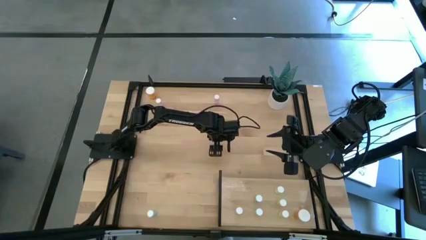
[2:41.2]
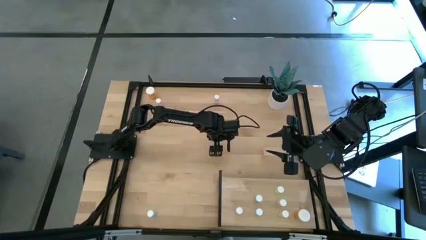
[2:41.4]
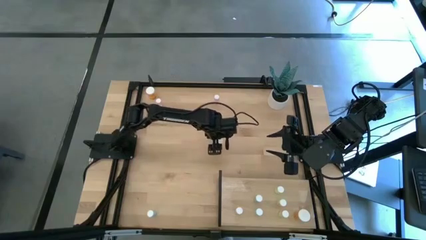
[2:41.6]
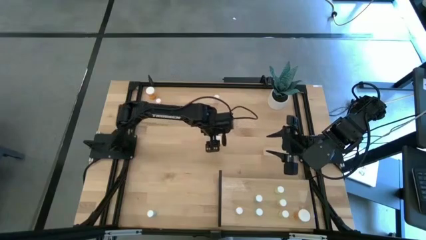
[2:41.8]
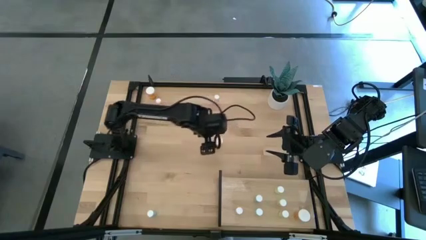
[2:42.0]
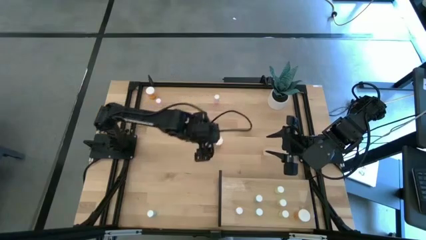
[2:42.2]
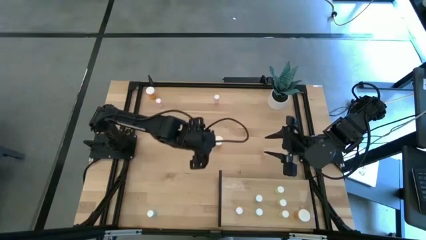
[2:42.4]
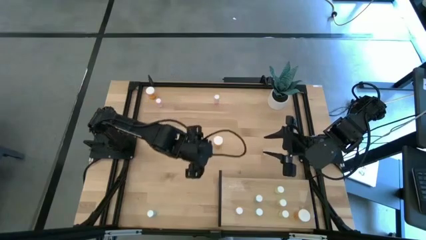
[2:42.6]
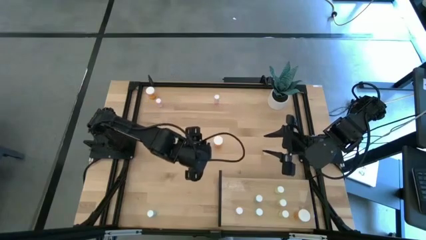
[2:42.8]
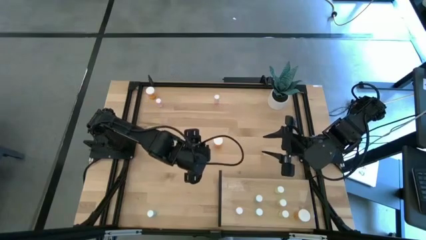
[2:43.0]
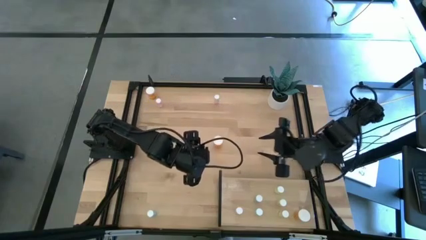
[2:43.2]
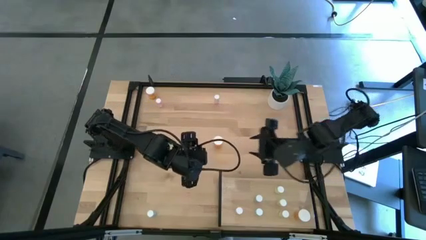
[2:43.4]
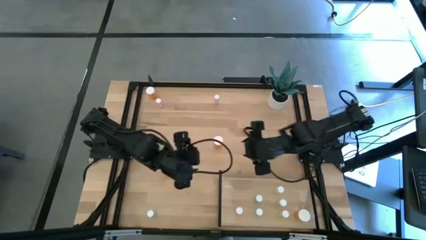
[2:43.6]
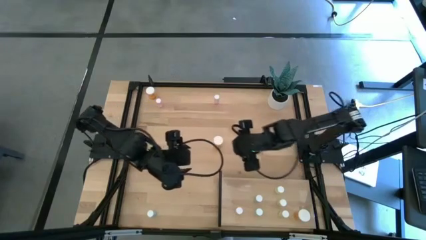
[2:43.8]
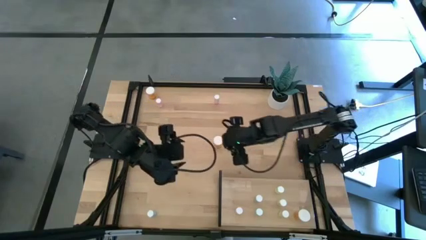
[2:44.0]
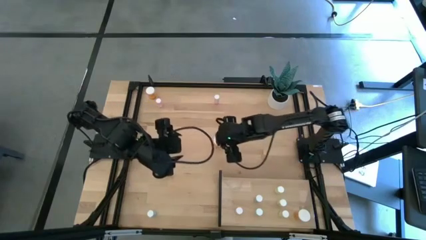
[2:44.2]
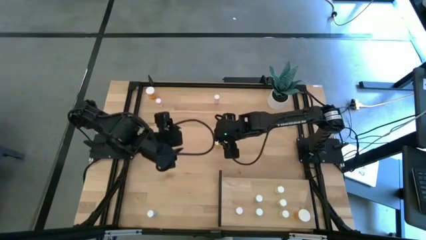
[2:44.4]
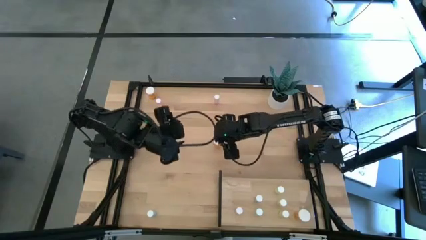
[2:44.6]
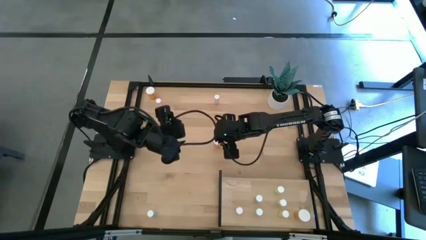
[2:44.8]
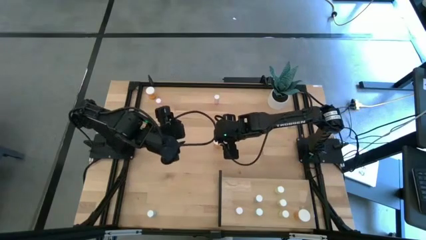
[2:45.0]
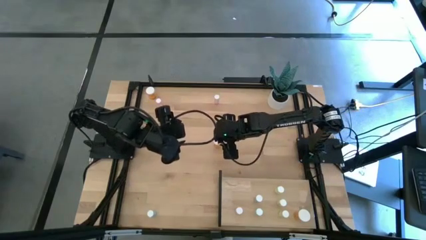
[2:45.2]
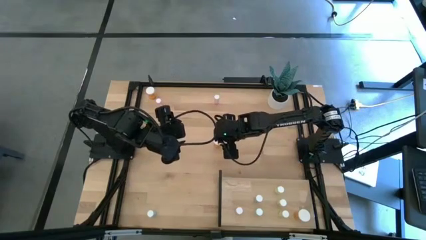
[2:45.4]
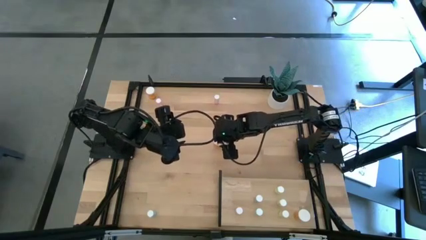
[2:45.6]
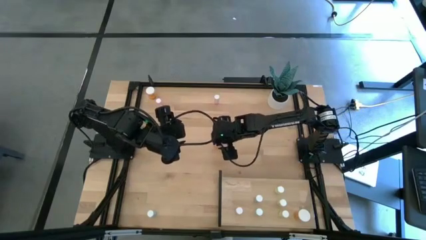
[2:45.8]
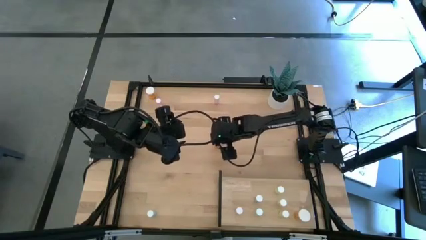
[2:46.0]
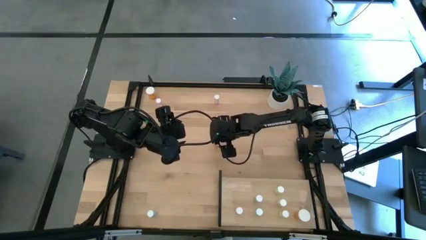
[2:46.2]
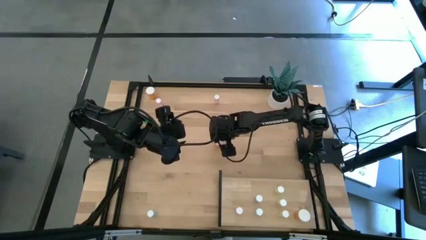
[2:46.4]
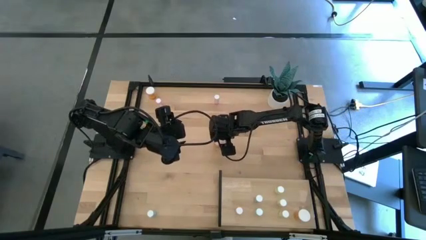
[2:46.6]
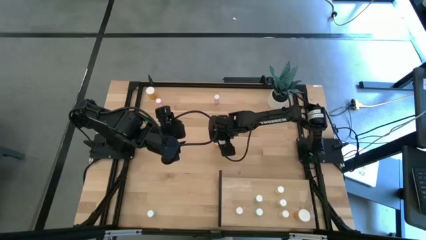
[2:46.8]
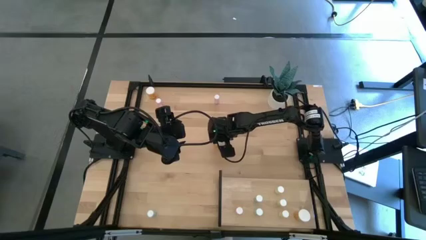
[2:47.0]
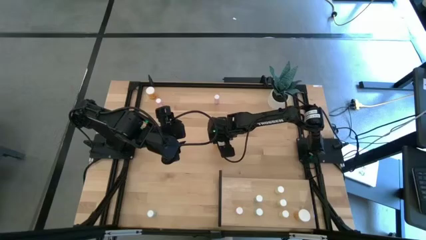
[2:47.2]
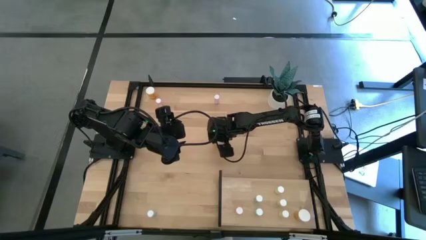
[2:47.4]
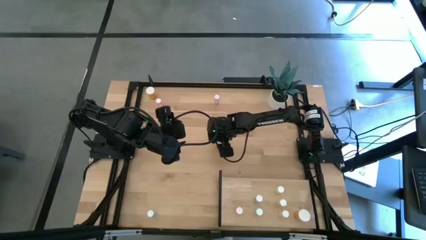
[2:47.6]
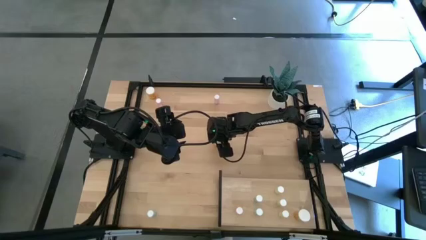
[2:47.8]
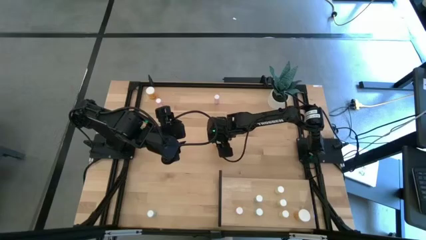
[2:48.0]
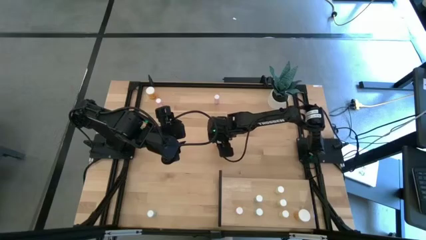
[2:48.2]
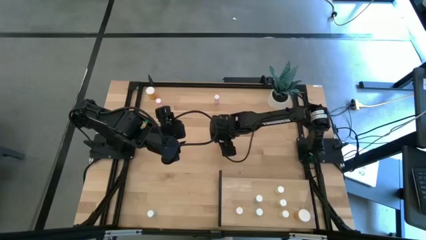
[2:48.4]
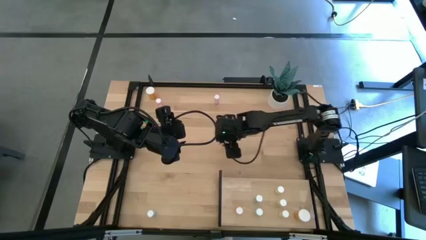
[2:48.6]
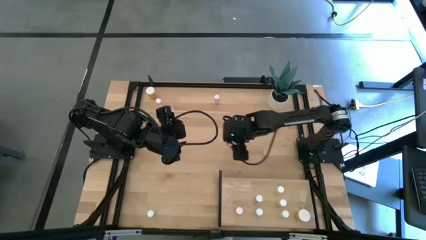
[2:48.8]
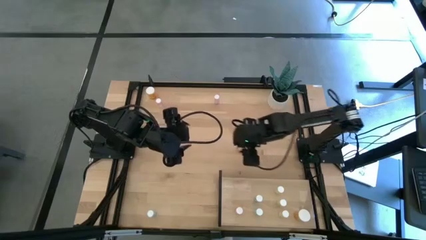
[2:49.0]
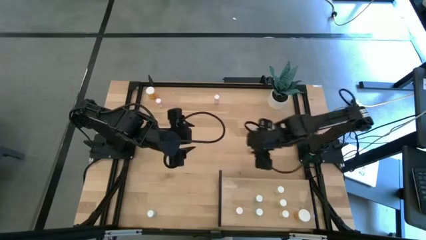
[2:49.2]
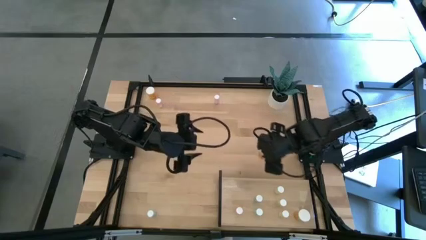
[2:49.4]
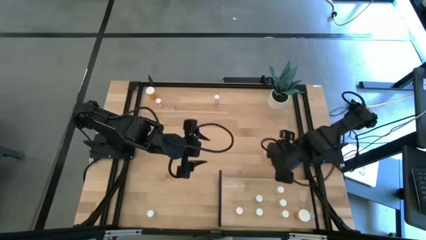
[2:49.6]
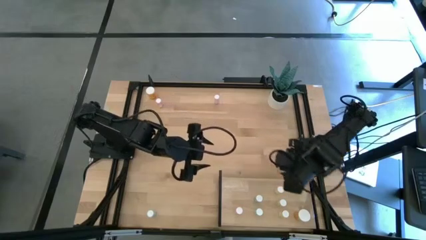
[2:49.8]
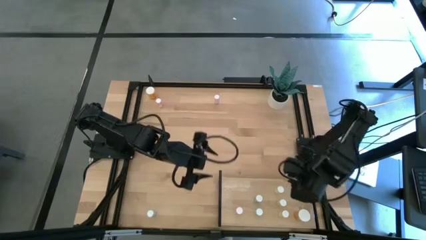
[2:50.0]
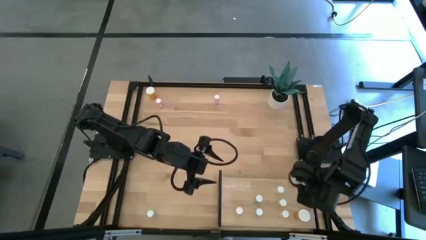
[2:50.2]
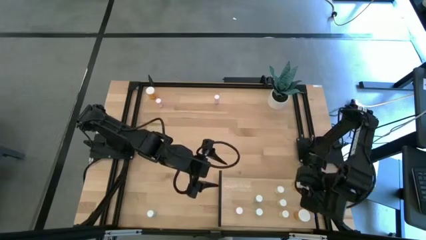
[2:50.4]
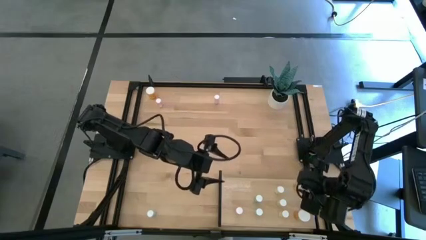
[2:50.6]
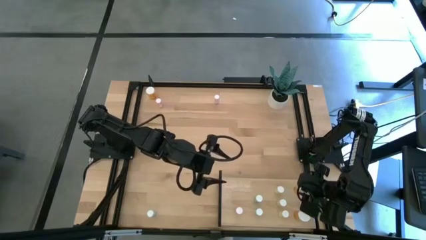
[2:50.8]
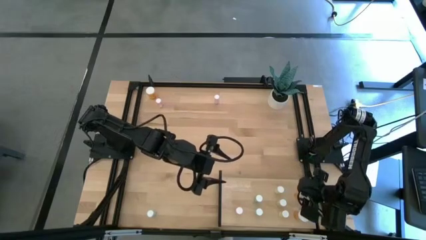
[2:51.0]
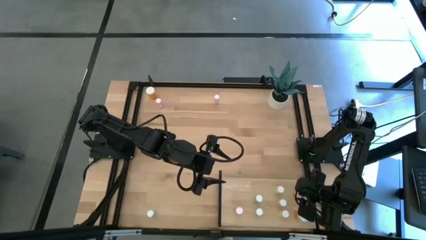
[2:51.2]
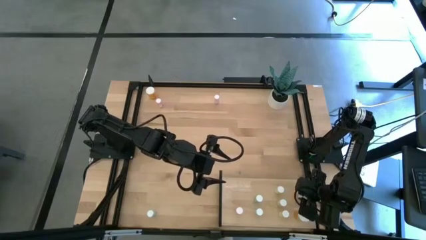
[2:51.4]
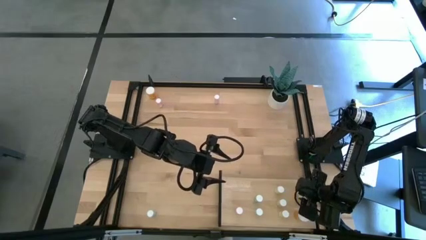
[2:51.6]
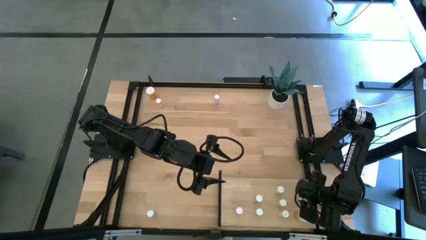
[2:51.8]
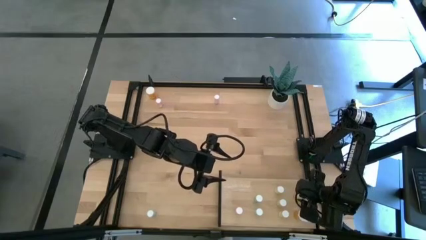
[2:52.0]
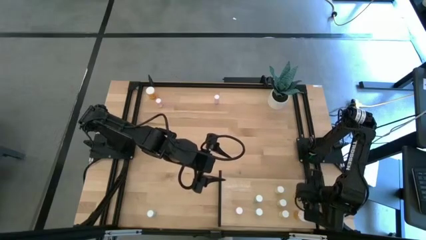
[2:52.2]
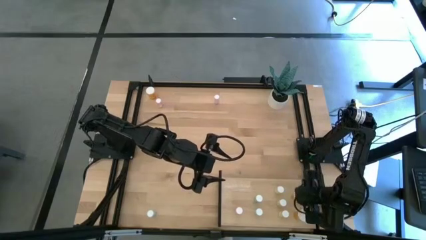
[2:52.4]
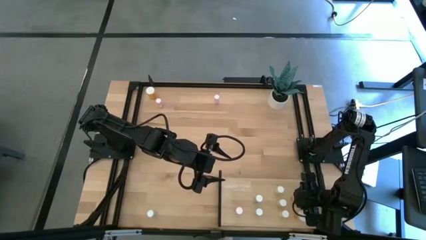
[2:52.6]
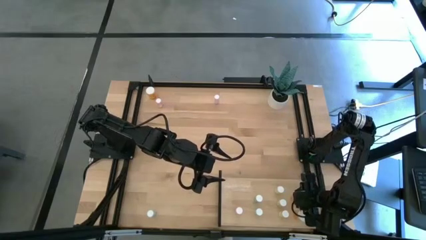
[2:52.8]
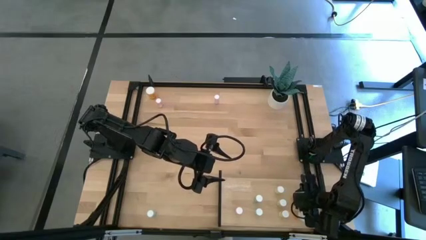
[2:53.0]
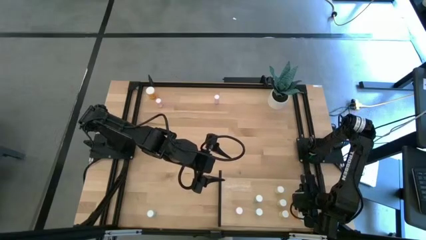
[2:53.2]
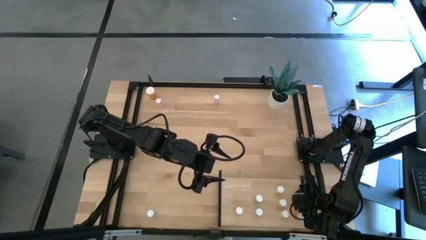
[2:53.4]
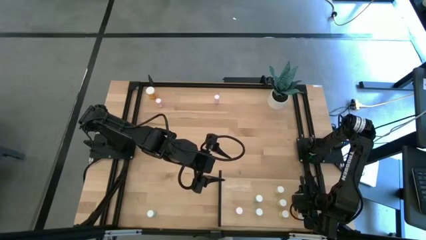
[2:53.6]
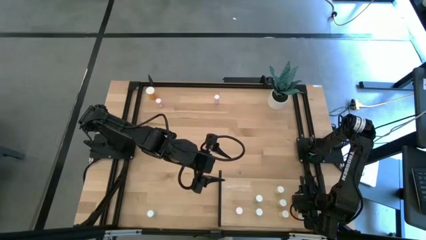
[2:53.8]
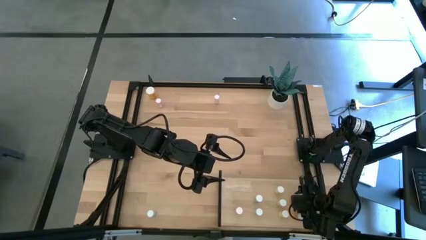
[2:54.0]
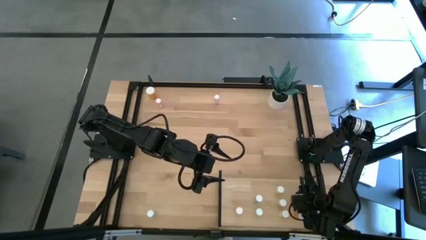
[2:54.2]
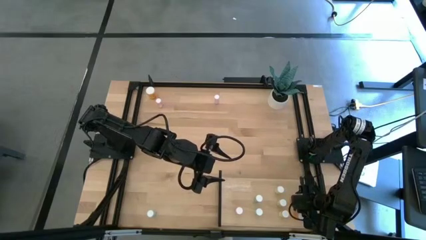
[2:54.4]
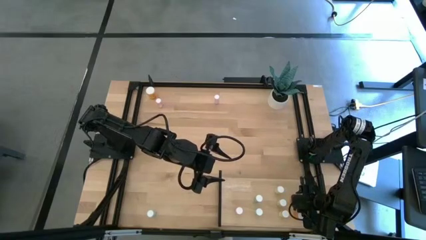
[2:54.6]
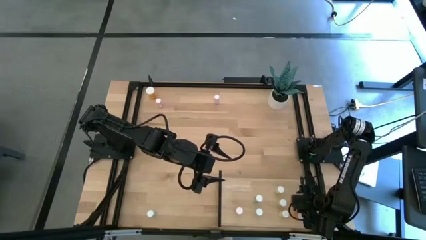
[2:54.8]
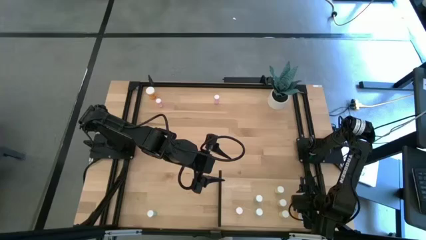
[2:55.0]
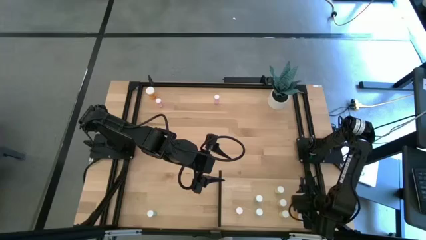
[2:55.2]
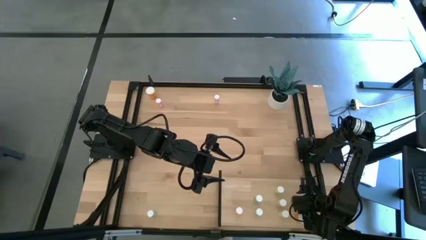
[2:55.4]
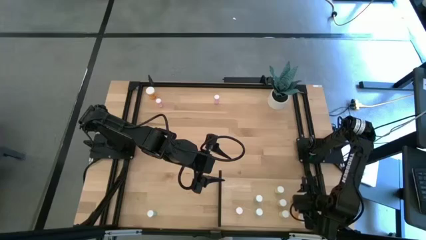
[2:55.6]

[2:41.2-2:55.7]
Task: Pick and place medicine bottles onto shelf by color
Put the orange pill bottle on the shelf aligned with the other orange pill bottle

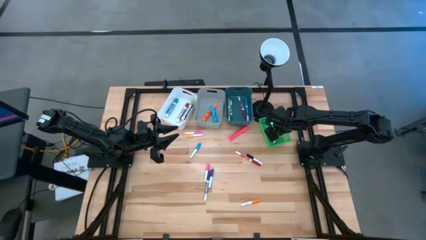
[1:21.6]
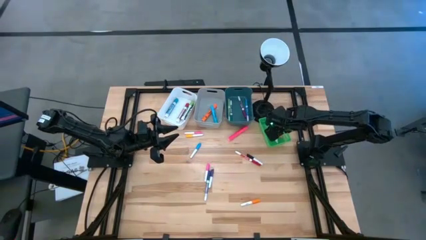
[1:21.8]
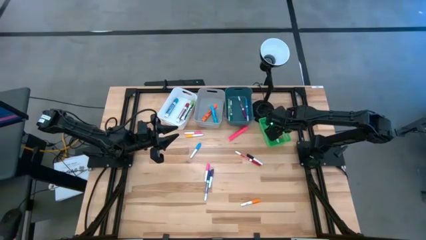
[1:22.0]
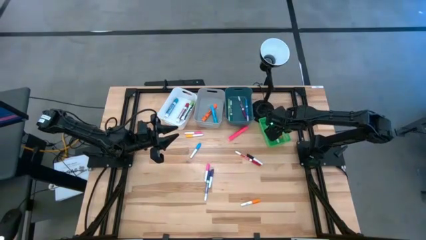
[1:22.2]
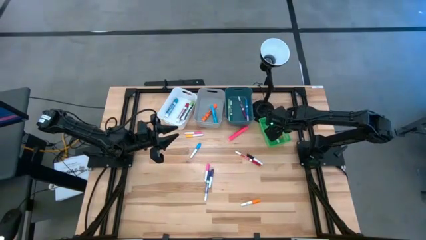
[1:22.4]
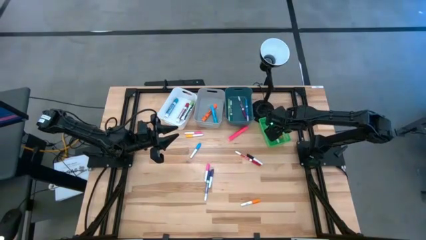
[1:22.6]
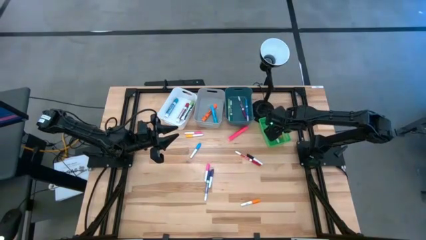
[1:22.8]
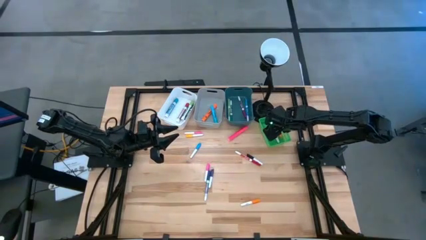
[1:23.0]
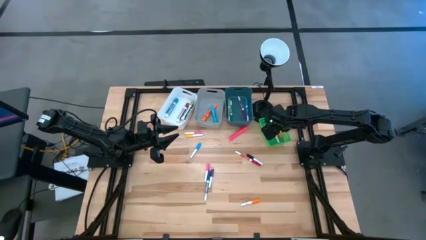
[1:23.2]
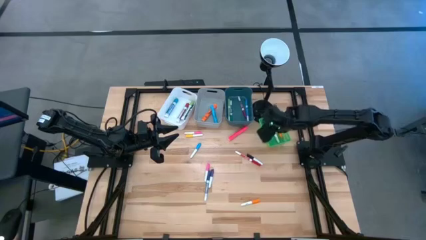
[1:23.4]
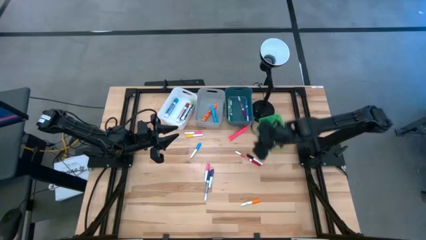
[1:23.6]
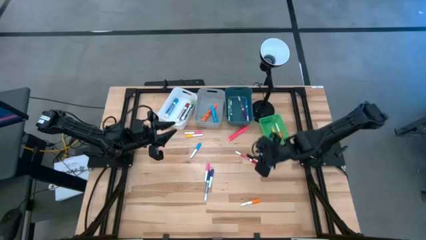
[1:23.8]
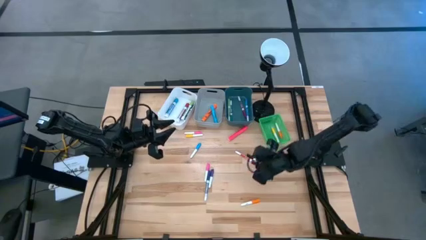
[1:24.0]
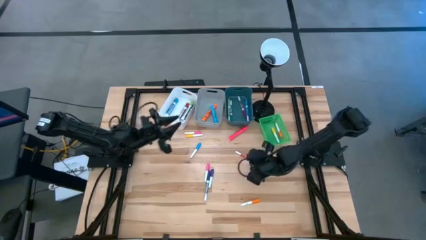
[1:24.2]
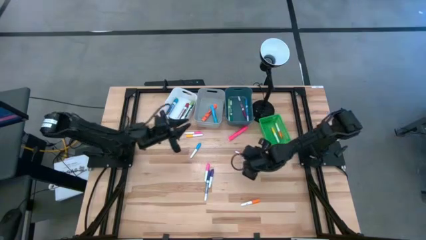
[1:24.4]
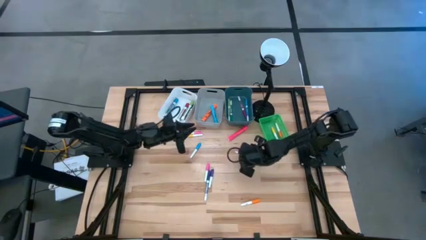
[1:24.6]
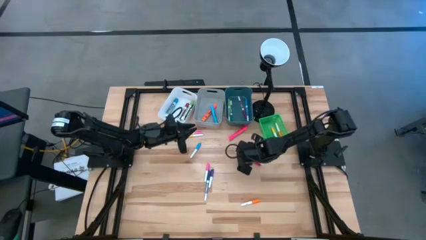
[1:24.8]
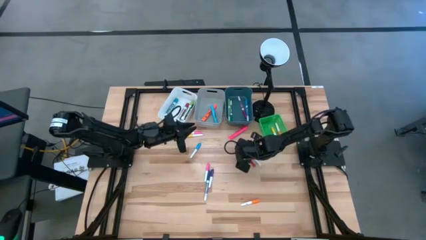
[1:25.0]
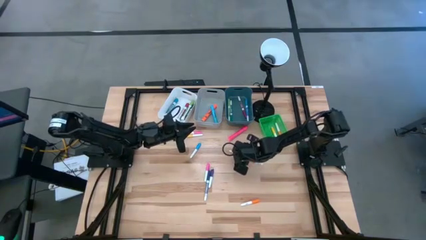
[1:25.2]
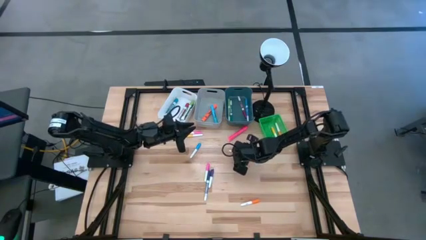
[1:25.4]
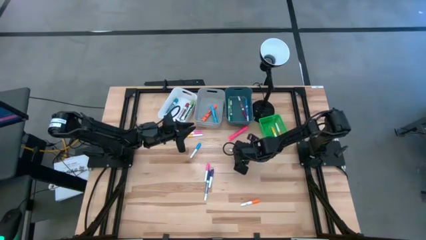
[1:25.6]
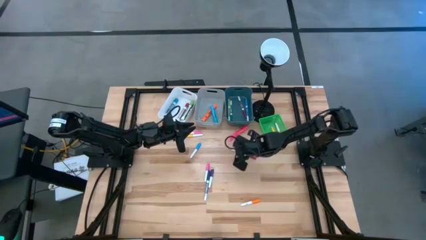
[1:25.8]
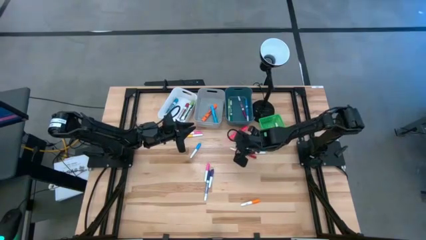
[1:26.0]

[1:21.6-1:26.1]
Task: Pick & Place Markers
Put the red marker pen into the blue bin
